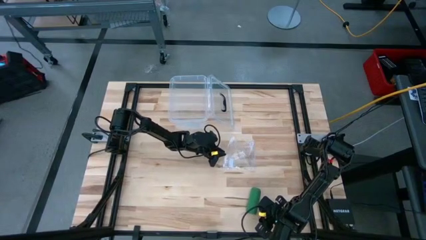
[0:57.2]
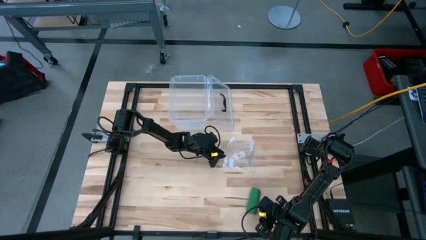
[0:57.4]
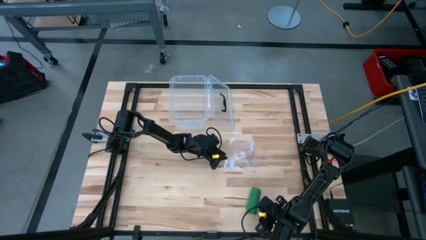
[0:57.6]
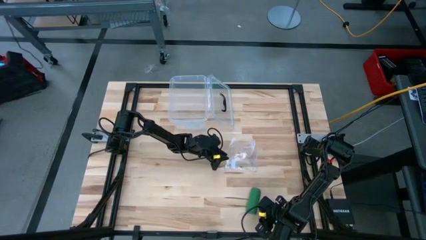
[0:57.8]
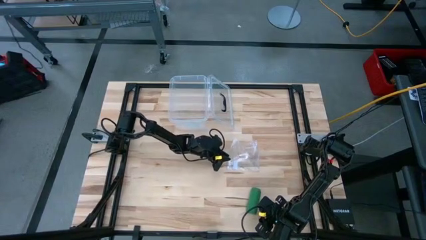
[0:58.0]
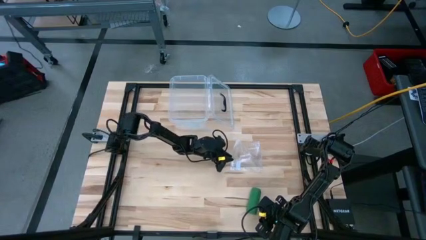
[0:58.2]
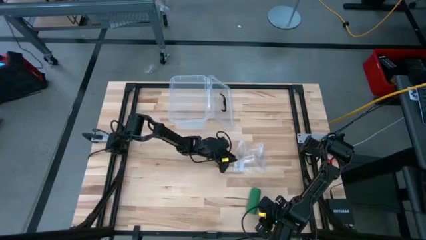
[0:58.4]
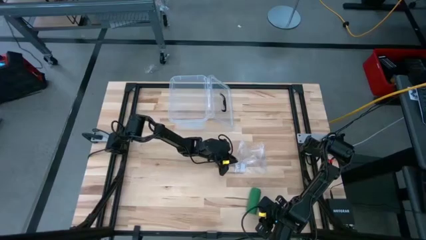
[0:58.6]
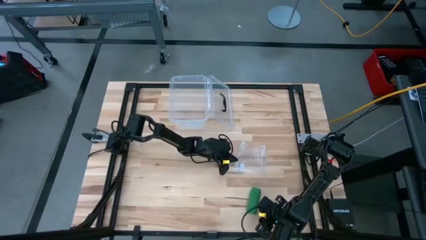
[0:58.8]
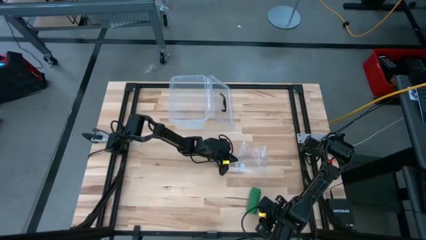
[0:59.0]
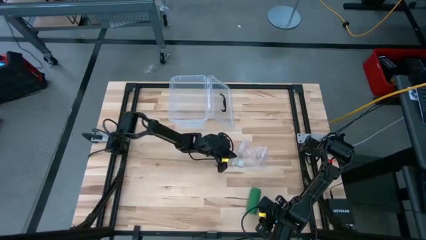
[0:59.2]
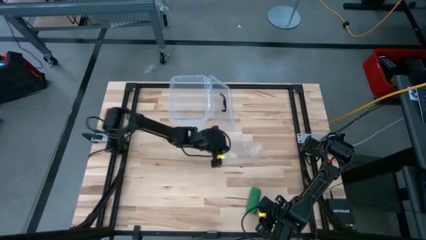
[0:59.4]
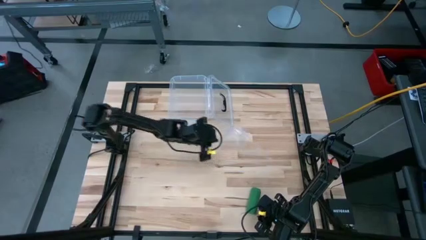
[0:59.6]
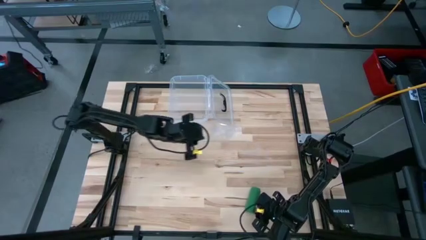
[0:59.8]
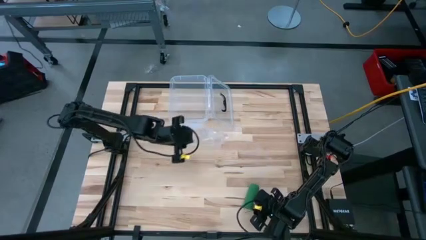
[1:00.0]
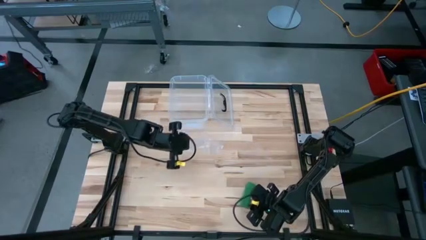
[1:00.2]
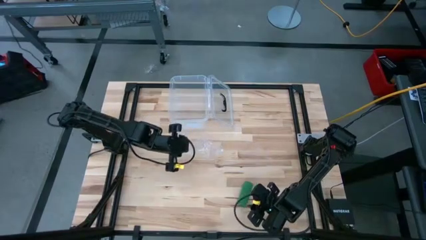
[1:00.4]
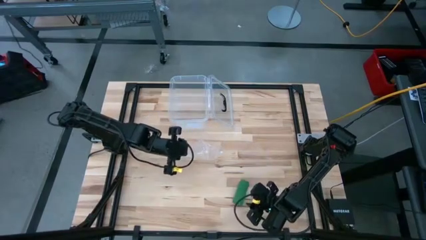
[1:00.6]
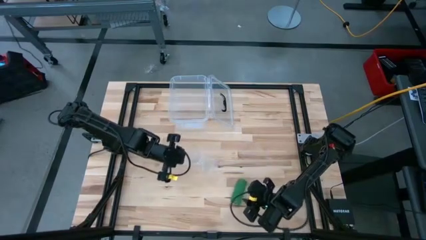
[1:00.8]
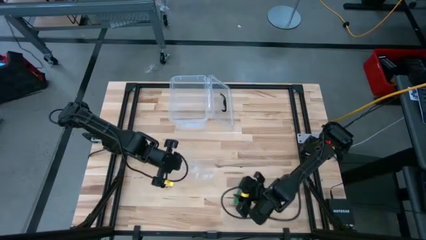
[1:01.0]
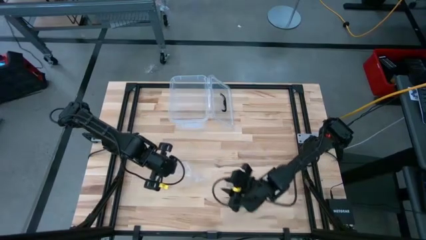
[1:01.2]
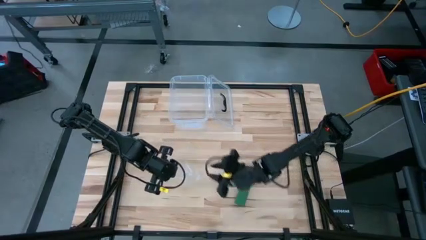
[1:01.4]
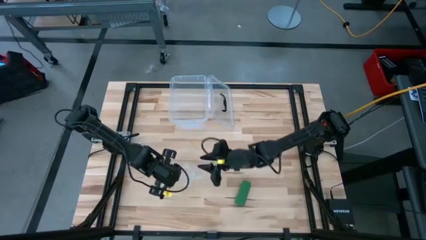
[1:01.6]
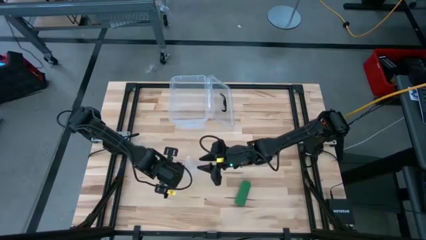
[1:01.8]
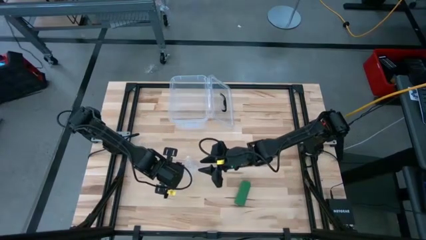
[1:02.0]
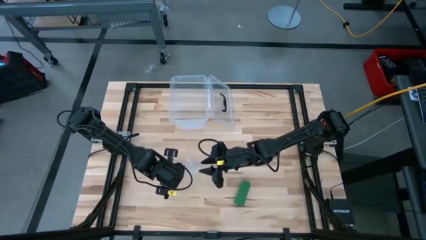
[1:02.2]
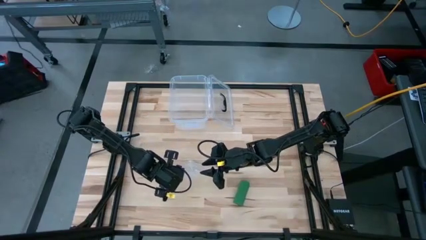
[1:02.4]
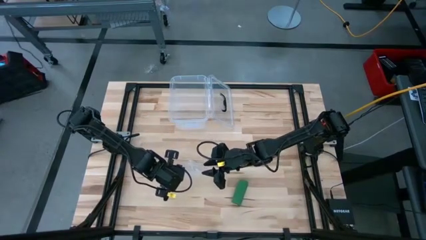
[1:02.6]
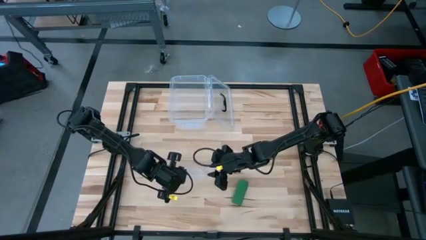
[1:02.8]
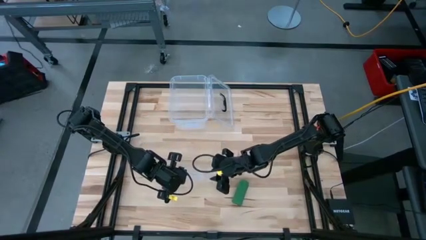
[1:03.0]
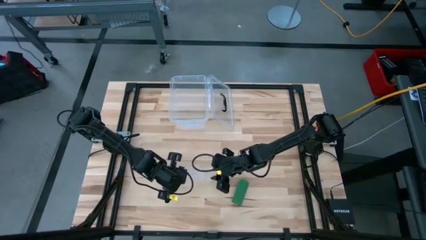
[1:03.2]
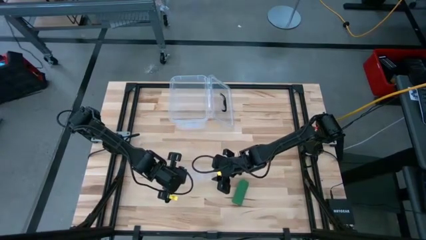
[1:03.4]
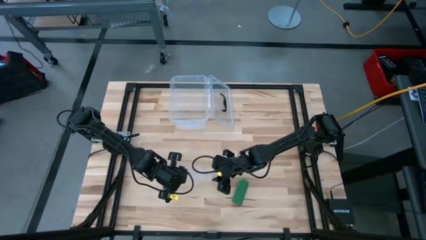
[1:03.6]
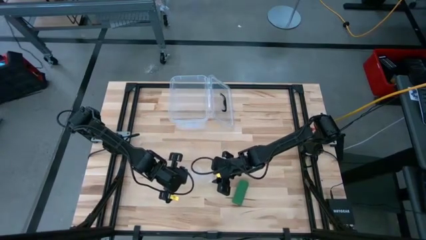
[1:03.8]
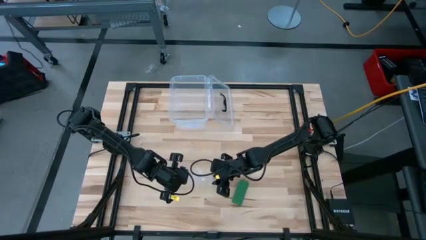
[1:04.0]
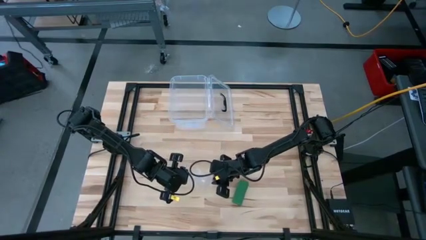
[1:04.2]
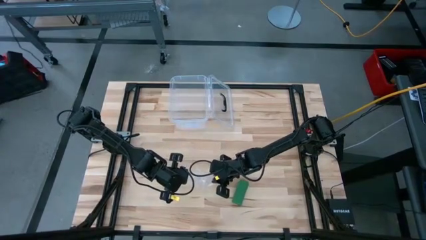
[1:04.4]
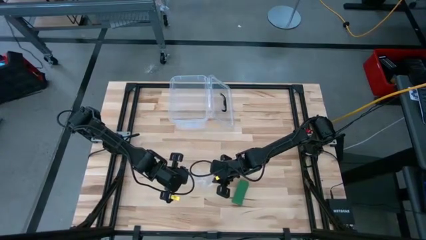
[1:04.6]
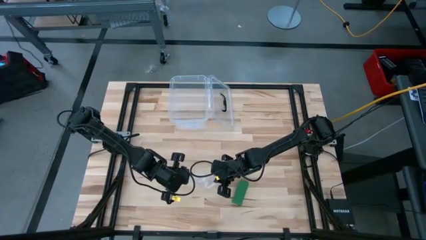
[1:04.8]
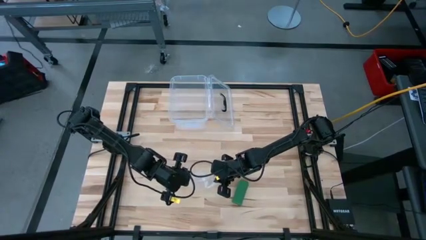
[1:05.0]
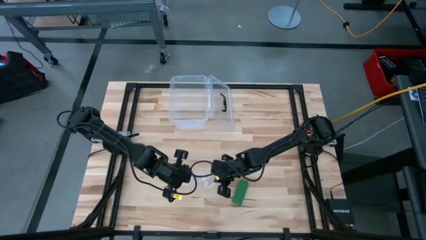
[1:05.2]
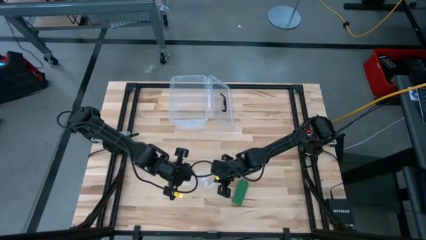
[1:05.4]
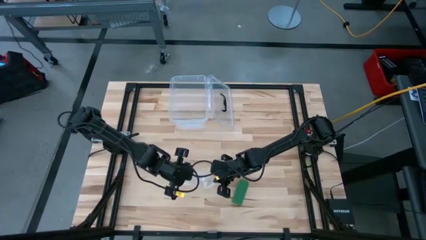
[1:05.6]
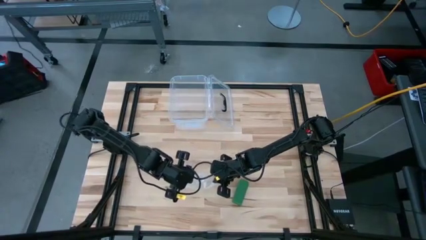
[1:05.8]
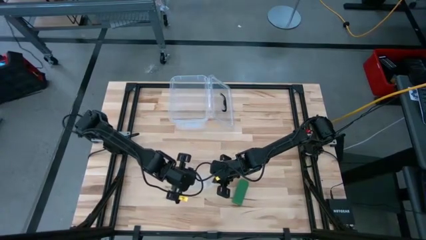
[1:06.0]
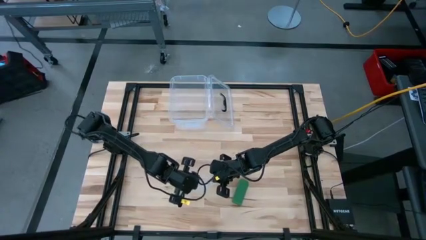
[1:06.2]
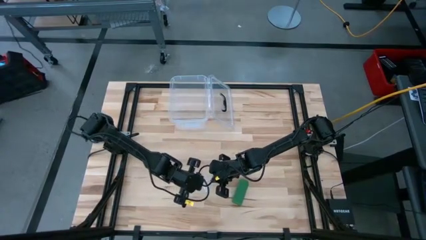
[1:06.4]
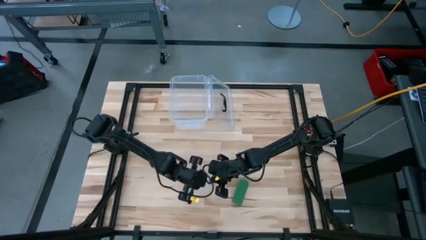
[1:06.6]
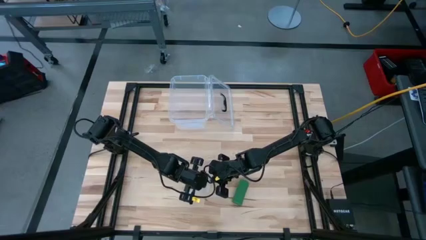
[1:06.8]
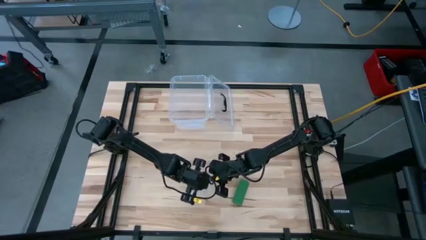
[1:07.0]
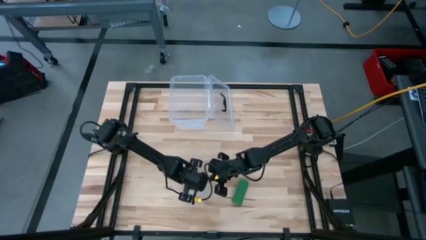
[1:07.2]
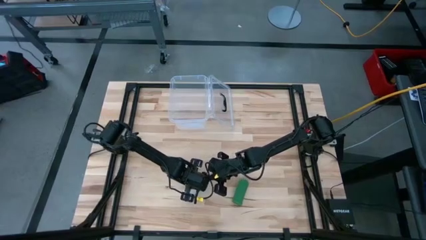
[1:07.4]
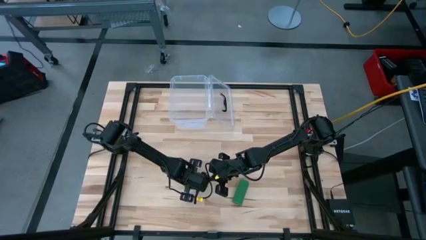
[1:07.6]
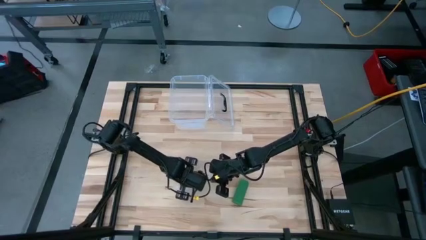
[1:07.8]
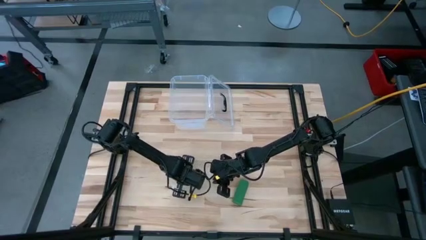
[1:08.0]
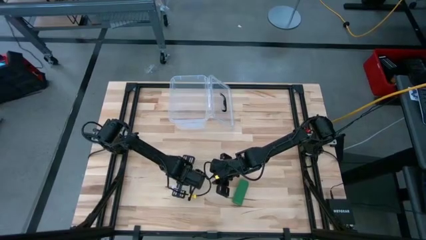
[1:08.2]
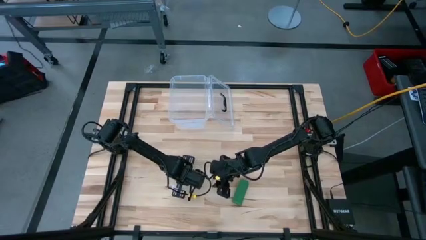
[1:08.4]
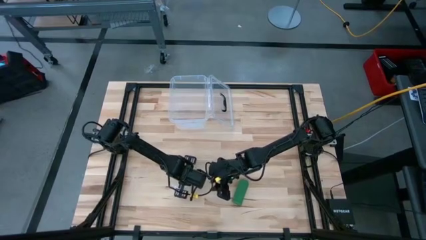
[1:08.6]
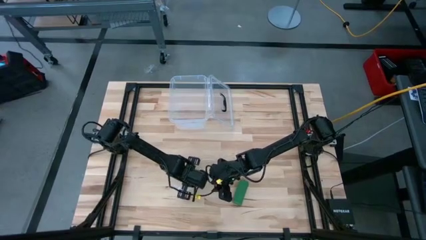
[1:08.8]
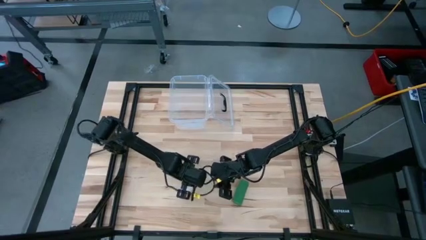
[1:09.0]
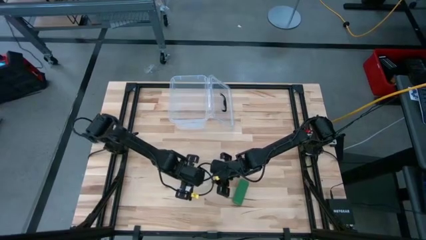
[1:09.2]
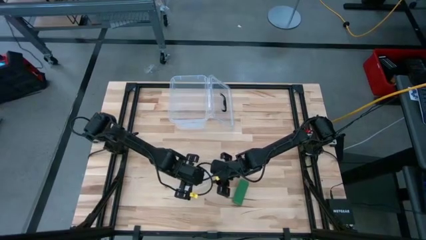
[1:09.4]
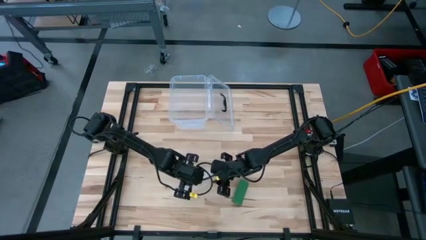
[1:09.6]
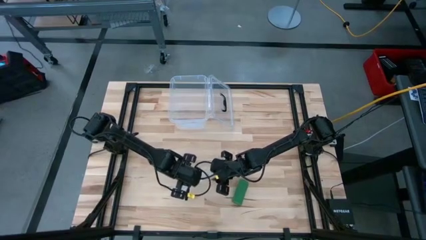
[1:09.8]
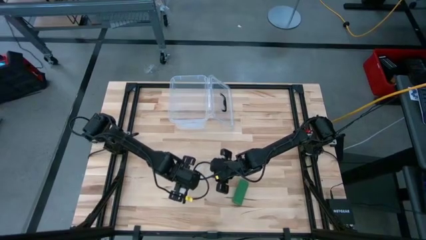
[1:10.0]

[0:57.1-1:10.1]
Task: Roll bandage
Prepare the transparent zip bag

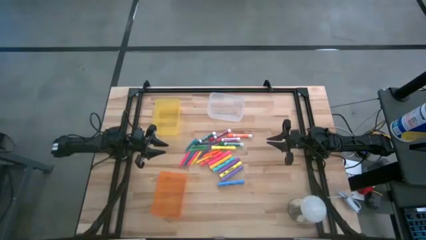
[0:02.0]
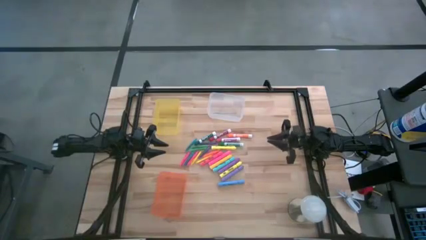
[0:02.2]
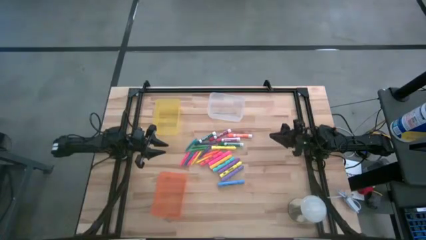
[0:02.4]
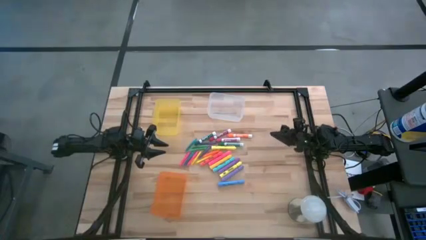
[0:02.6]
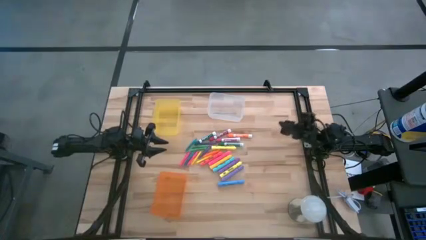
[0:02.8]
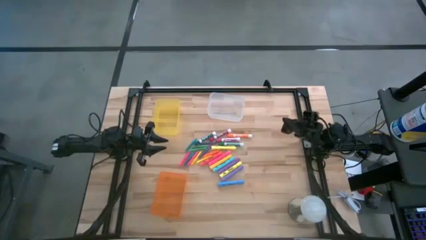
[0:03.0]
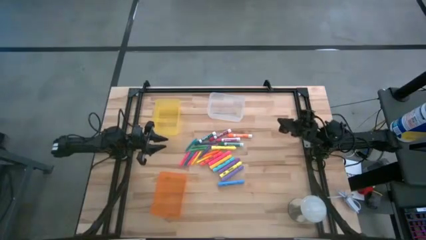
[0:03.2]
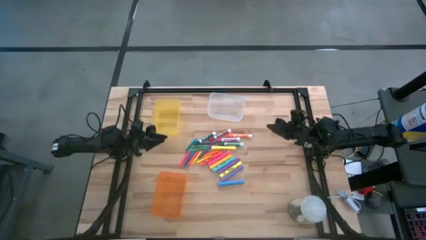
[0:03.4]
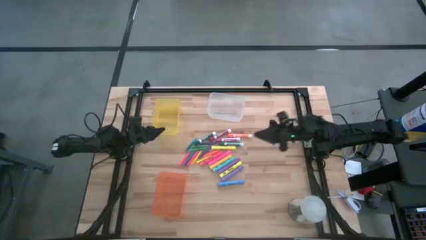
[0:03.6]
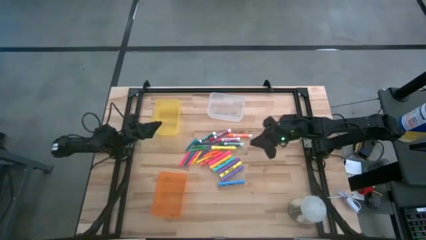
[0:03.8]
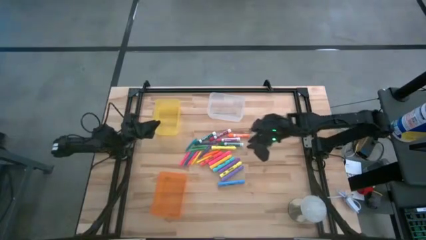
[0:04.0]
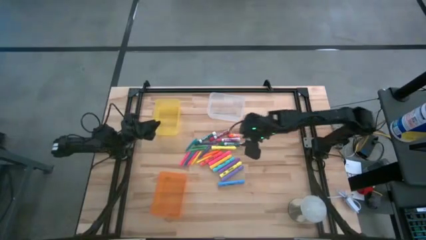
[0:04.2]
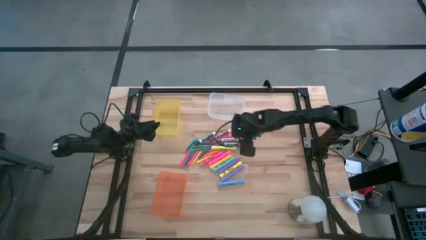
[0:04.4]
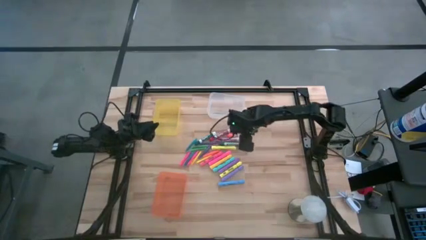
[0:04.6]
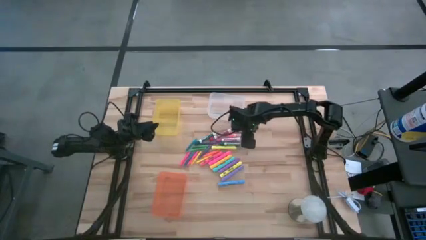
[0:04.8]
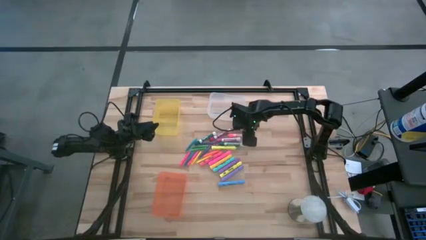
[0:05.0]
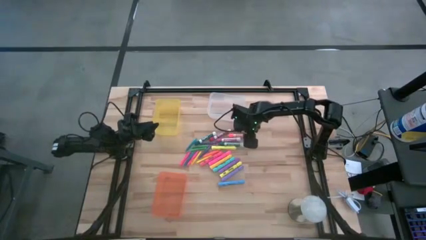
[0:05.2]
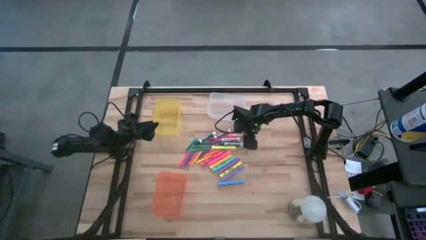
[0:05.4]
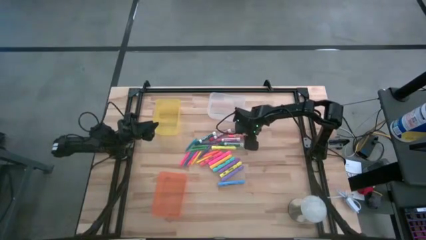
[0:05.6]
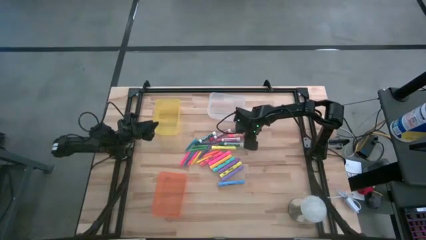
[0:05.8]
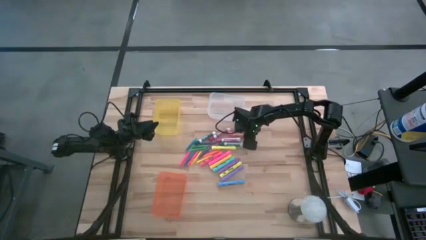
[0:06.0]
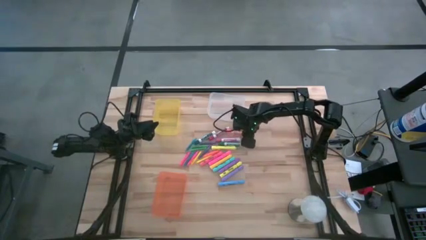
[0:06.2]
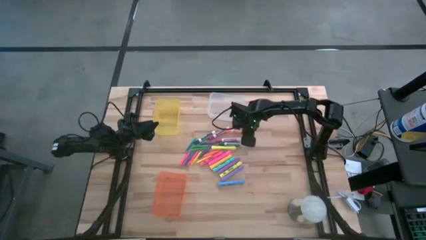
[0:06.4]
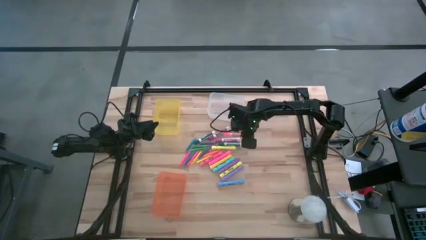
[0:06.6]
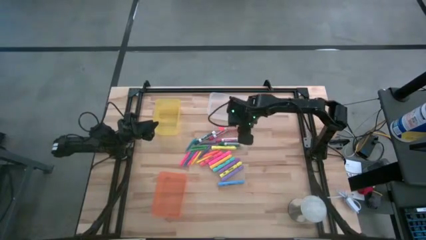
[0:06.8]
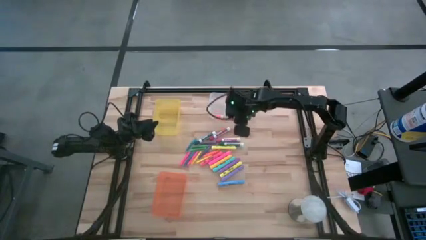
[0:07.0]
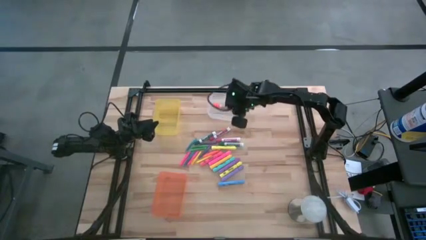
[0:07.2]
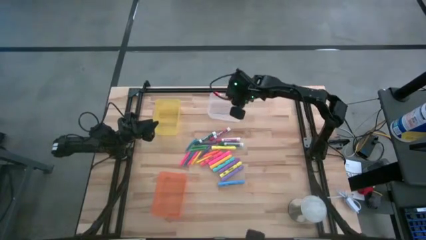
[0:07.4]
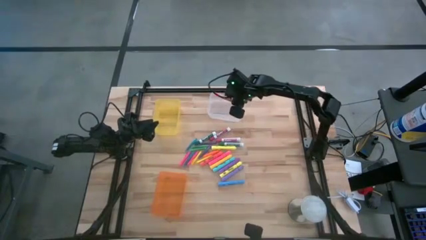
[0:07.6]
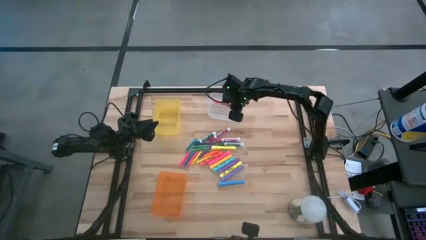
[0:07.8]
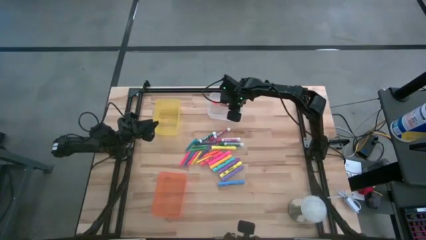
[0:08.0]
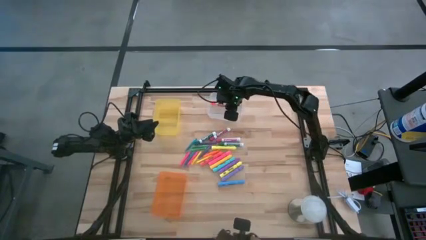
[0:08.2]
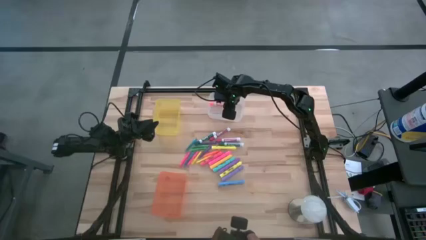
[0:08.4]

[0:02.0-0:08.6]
Task: Pick & Place Markers
Put the orange marker into the transparent bin
